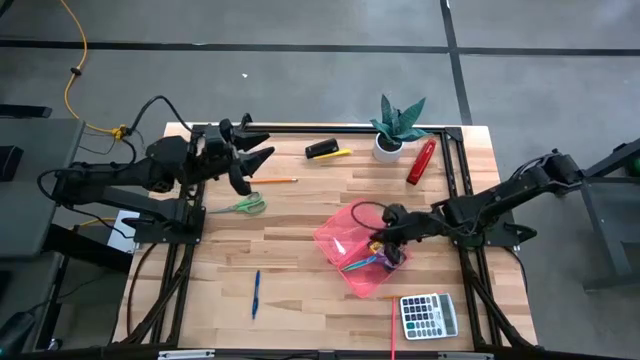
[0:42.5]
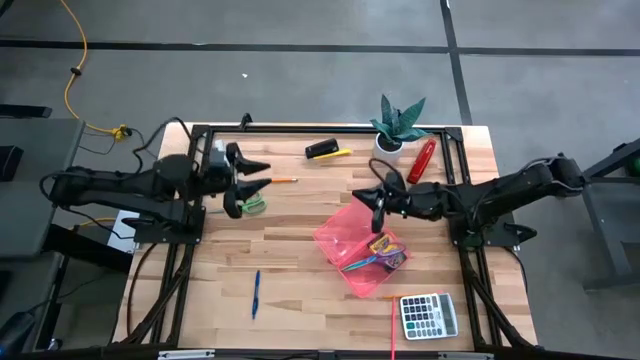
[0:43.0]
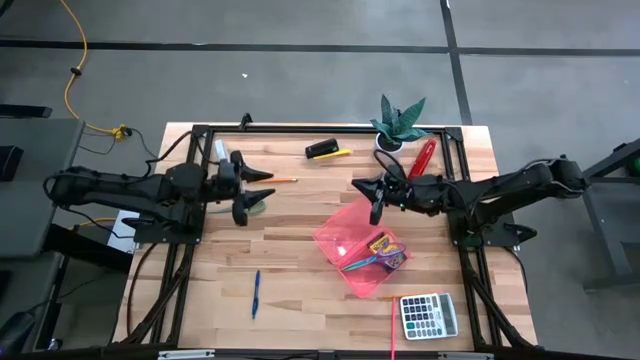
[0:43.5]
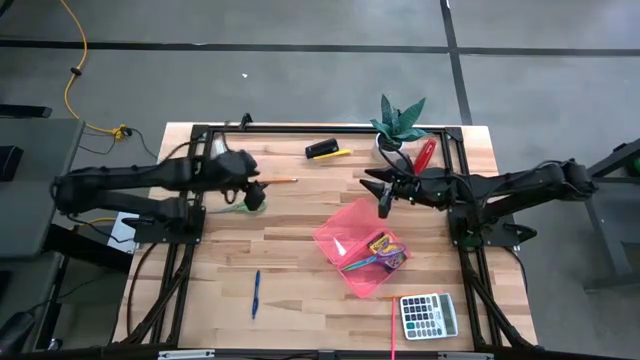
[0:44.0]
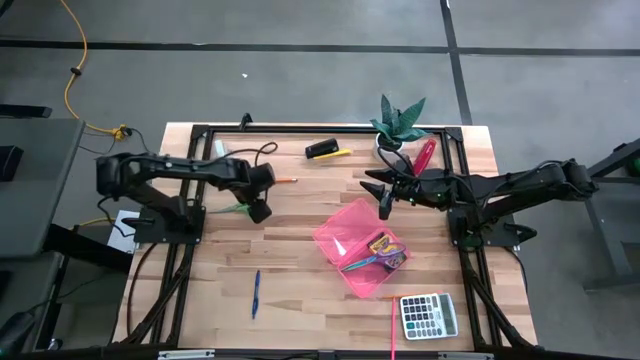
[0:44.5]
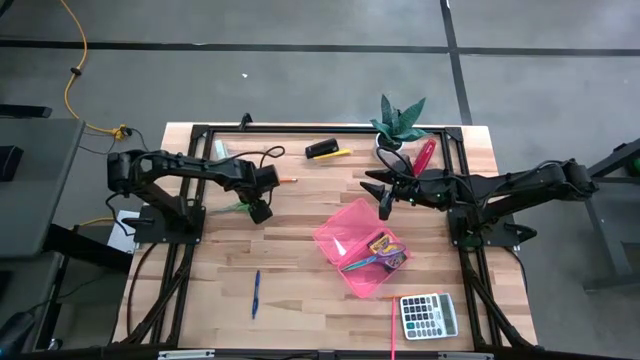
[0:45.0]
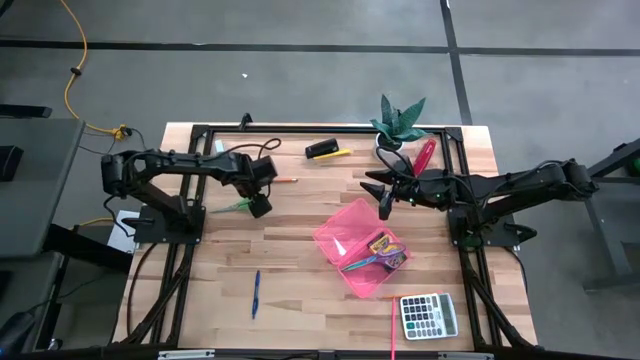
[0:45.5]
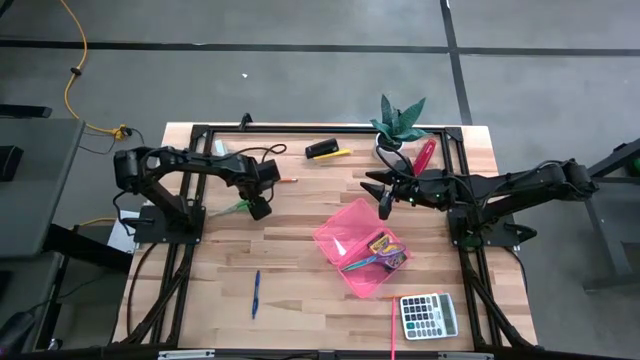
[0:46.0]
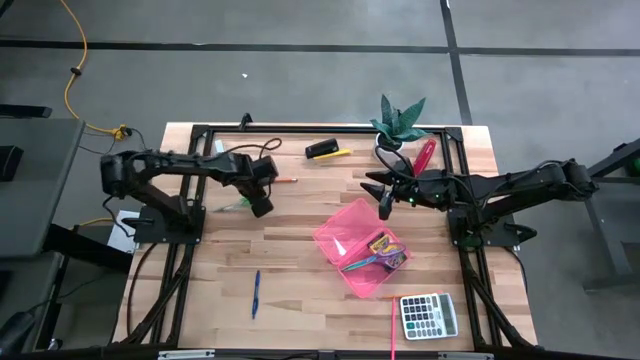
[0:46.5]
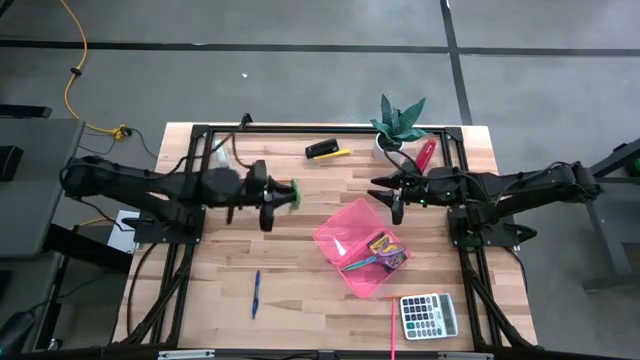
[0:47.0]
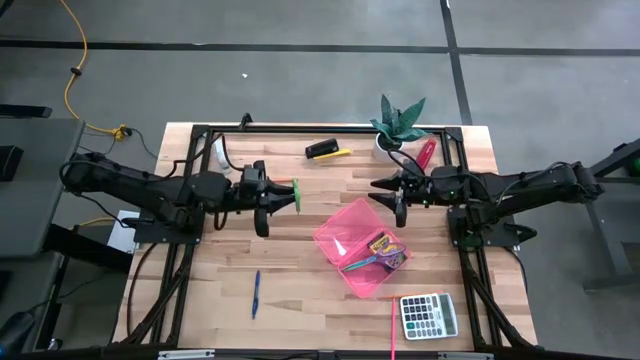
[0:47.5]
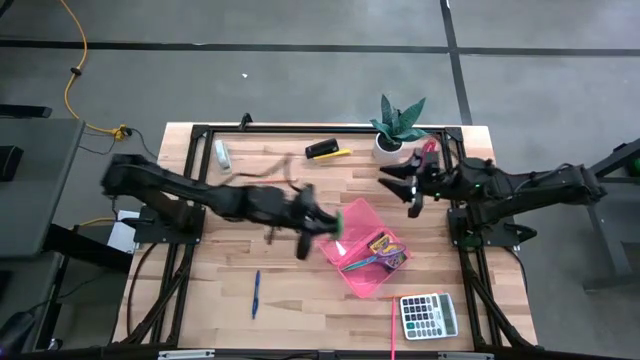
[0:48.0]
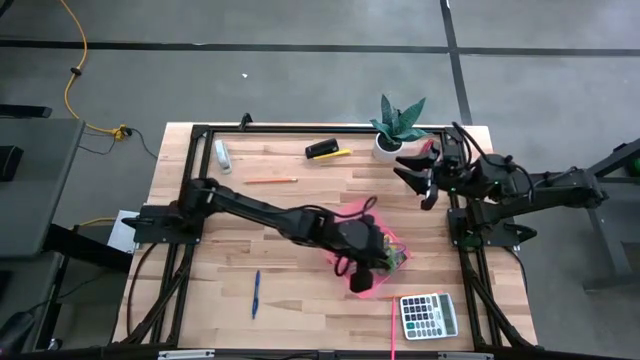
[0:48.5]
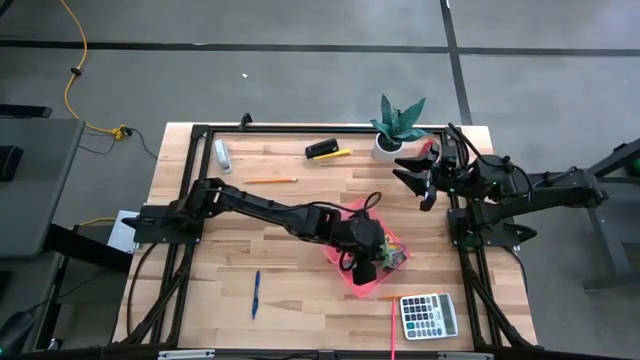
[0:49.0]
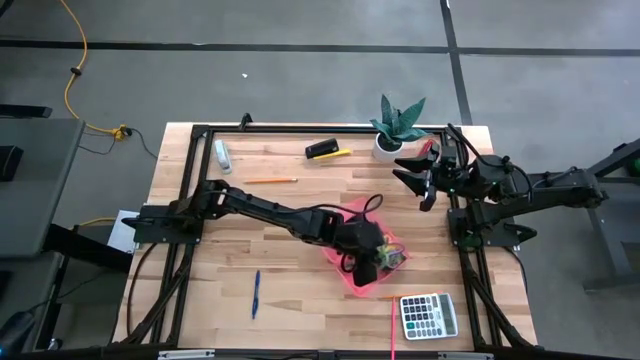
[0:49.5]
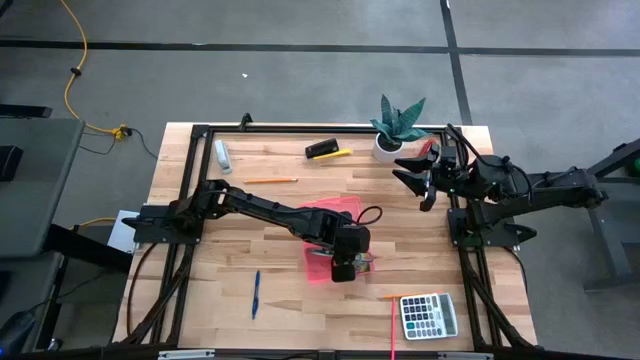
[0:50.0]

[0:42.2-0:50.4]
Task: Pack school essentials
Put the green scissors into the pink supply box

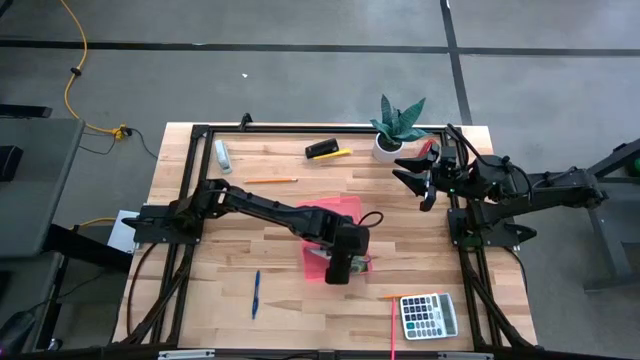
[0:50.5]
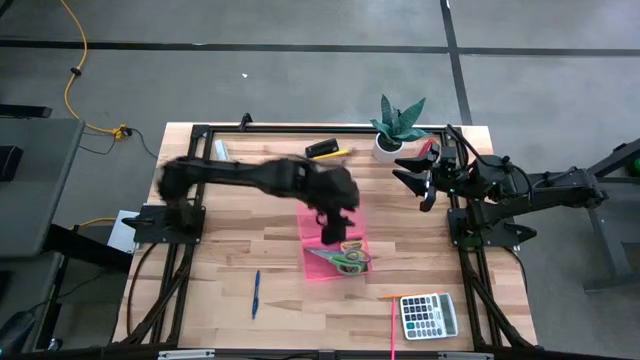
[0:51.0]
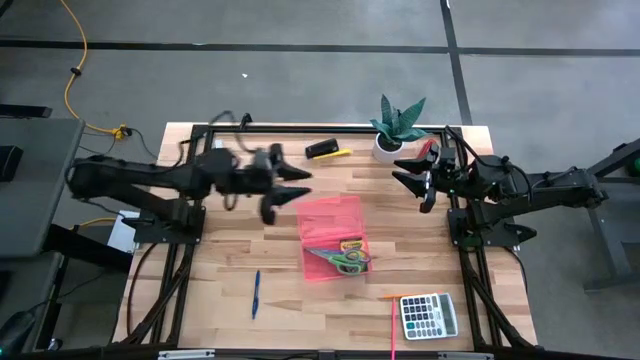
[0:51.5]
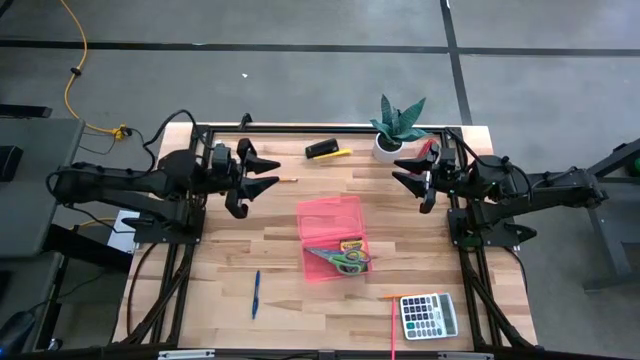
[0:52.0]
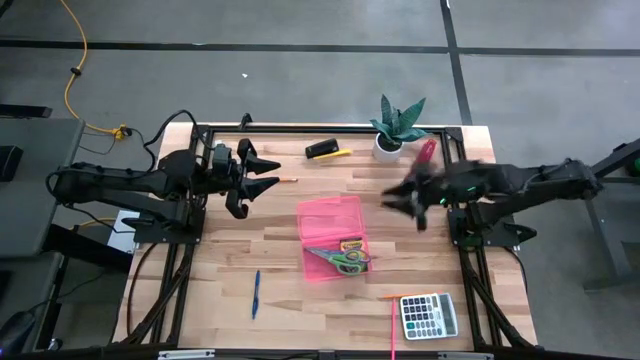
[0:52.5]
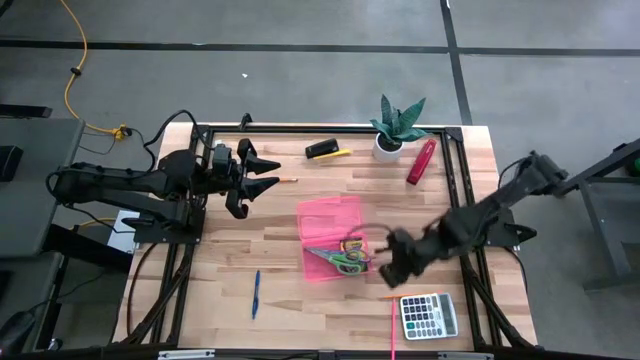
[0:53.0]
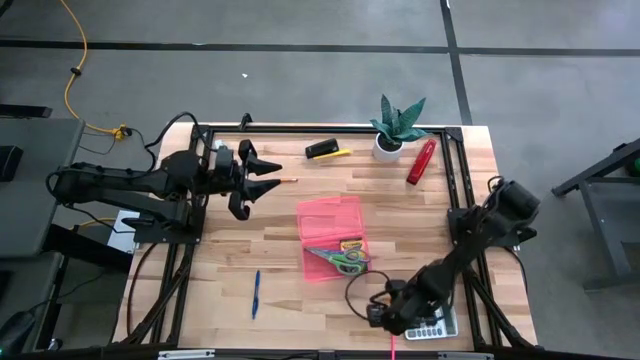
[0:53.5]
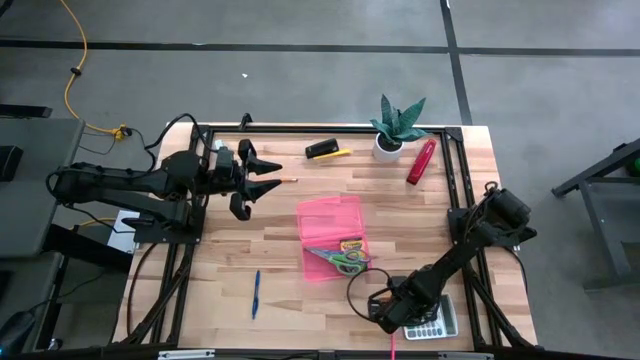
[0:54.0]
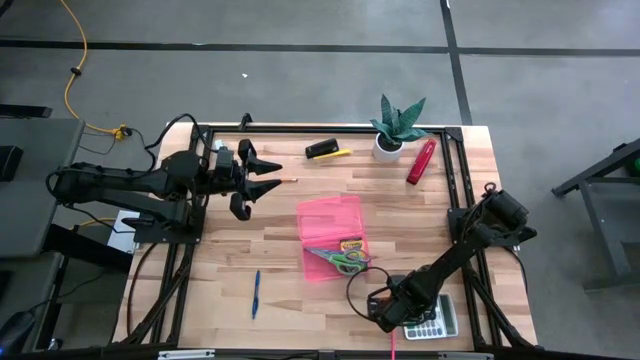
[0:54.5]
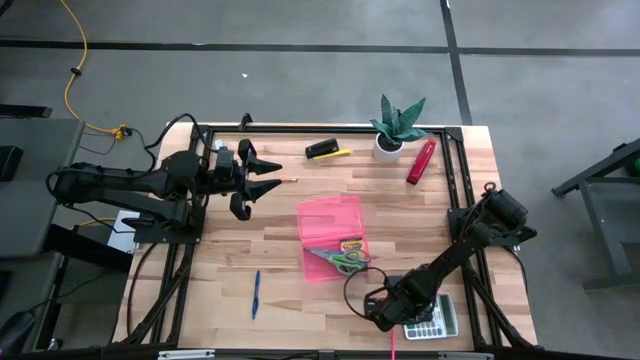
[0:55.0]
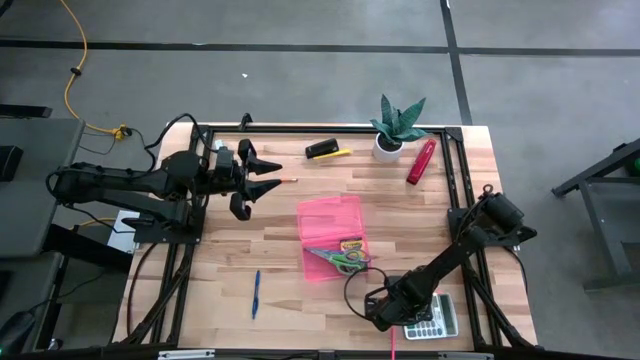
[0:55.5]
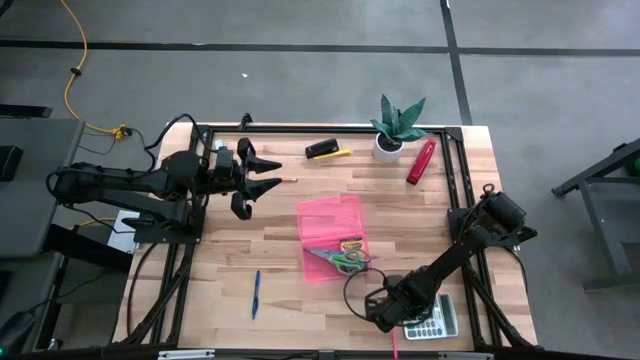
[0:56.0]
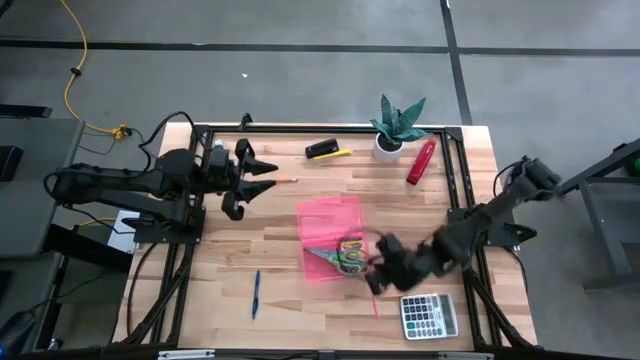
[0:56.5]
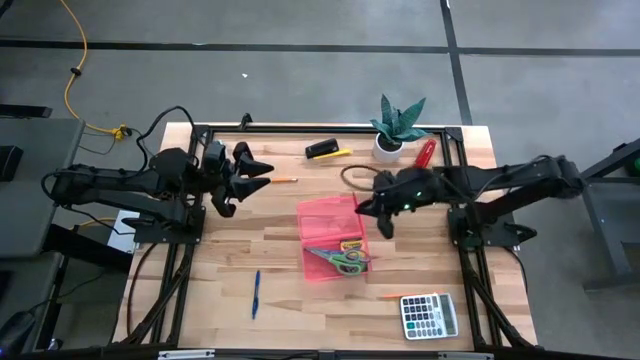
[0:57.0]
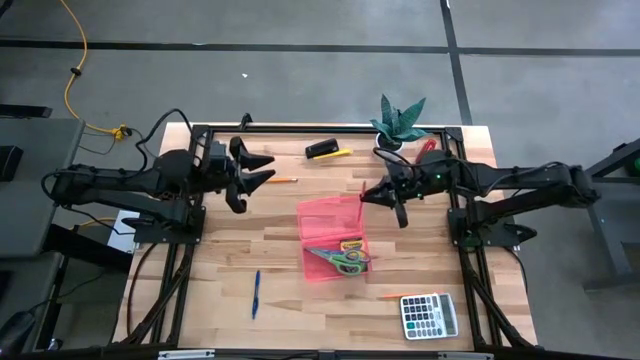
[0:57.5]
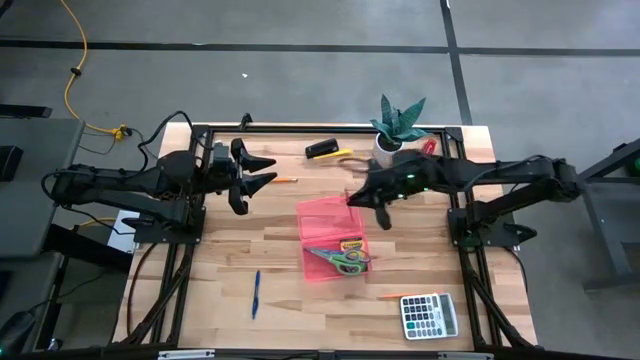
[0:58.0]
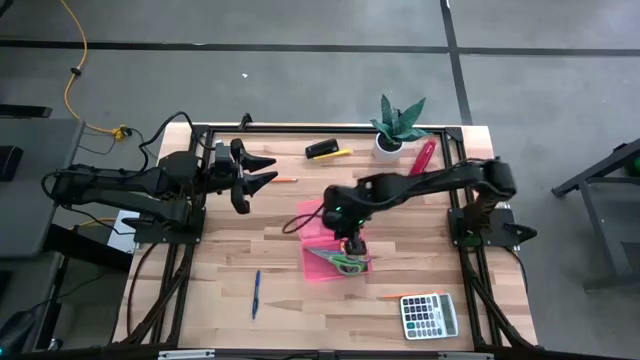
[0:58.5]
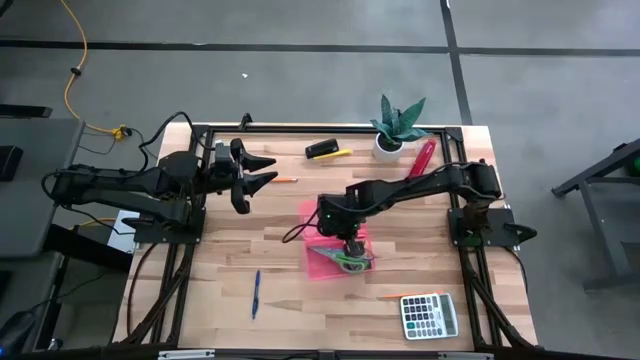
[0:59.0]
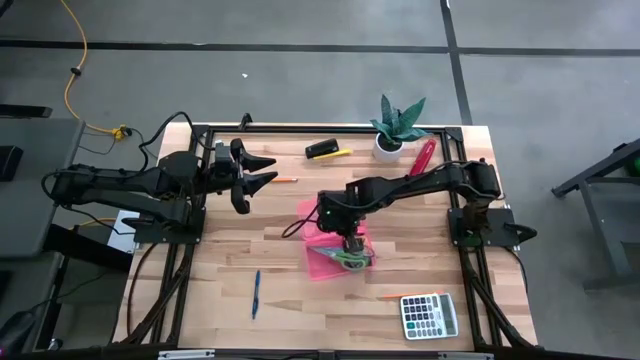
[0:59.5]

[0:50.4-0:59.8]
Put the pink pencil into the pink supply box

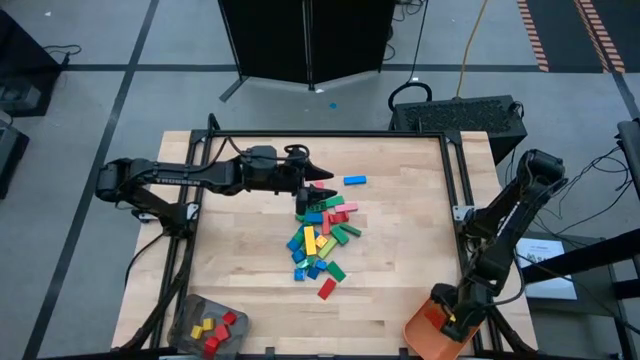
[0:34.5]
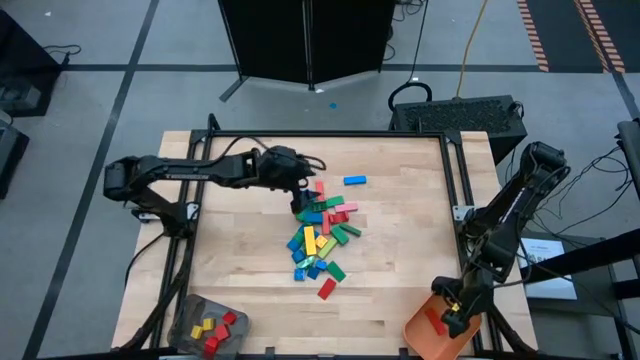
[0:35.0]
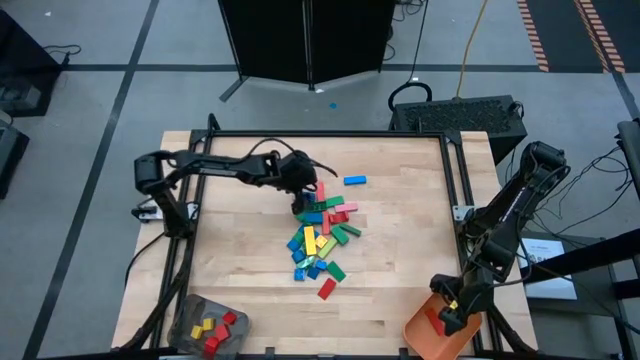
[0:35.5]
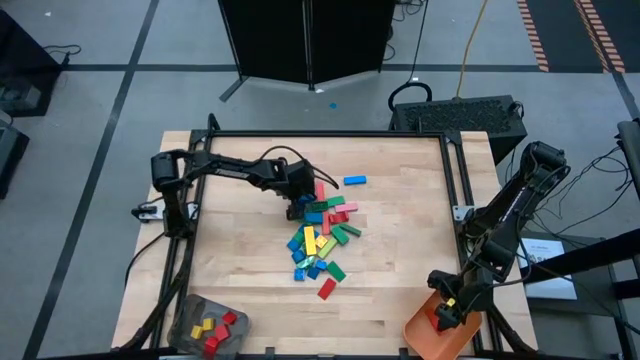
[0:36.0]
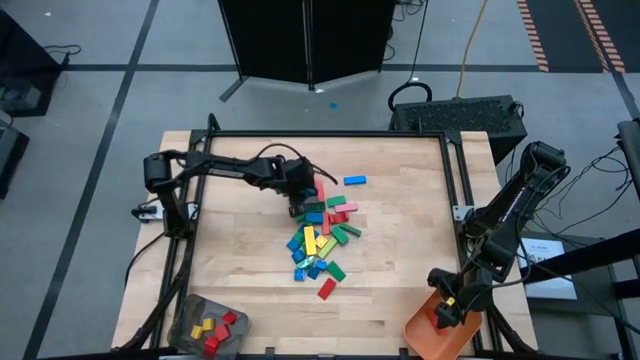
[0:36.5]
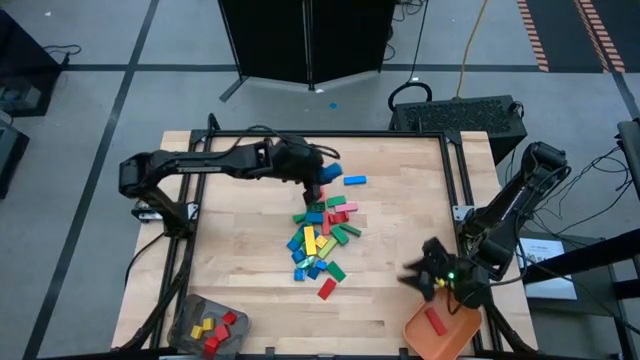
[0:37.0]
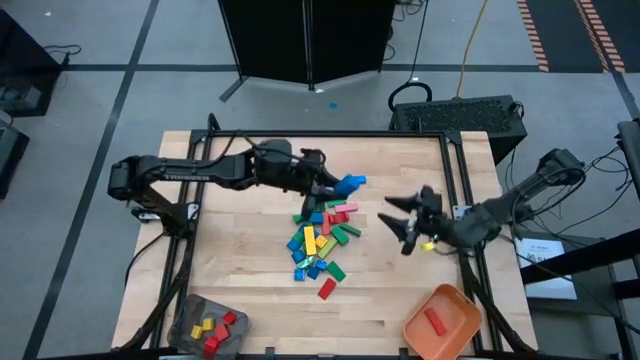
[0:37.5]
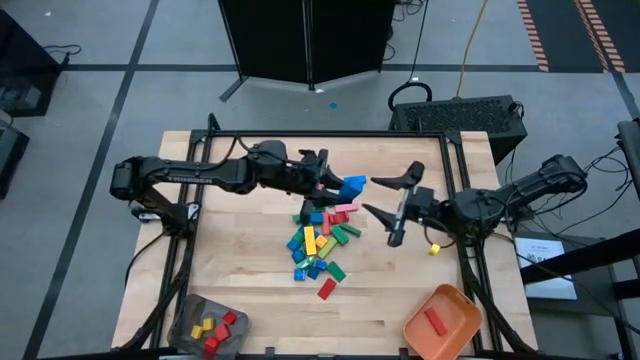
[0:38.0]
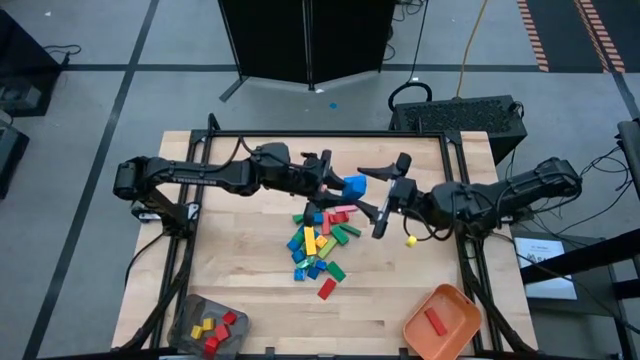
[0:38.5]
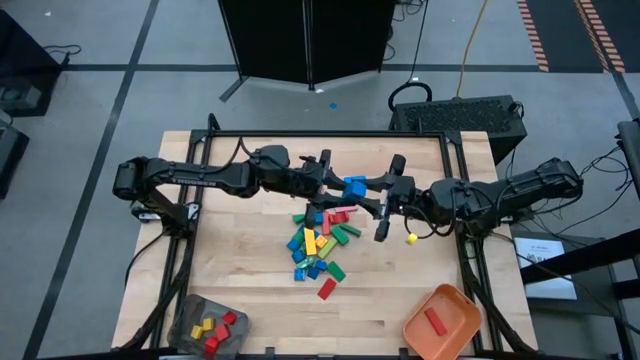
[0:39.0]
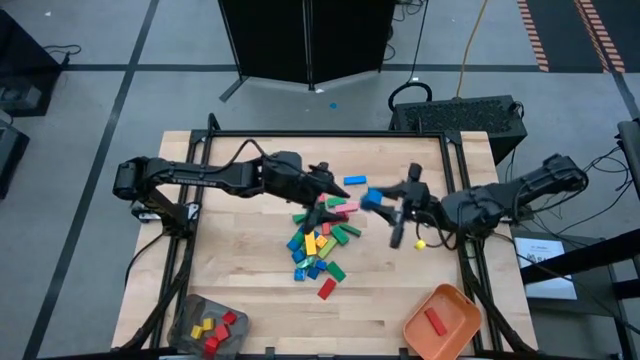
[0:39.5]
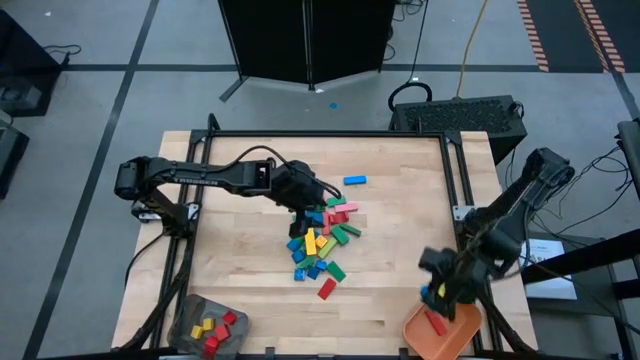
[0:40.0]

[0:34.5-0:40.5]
Task: Sort blocks by size
Put the blue rectangular block into the orange bin
